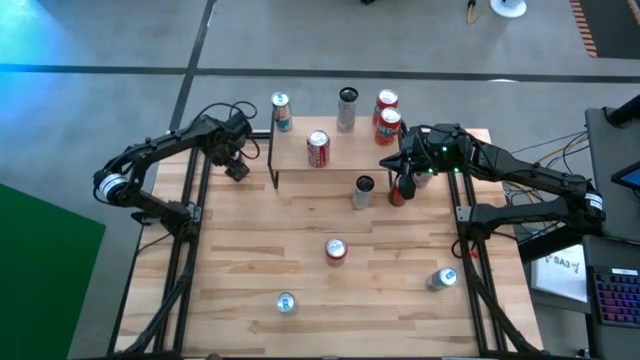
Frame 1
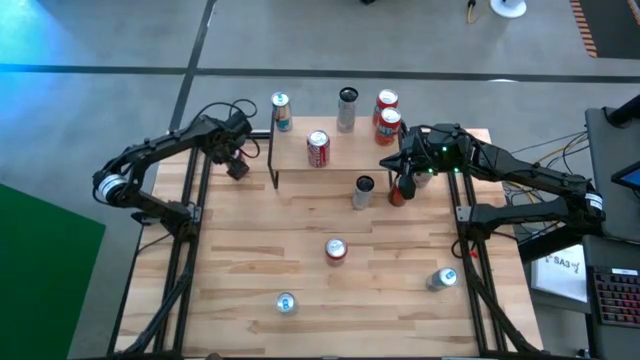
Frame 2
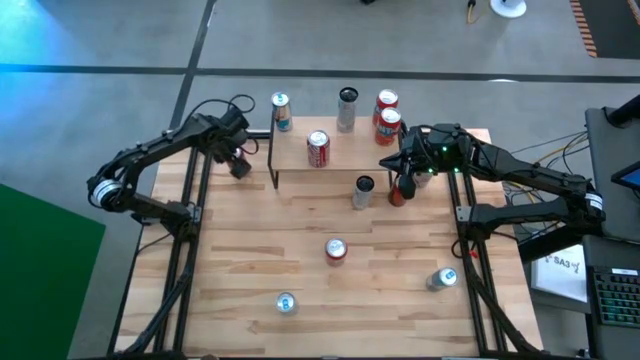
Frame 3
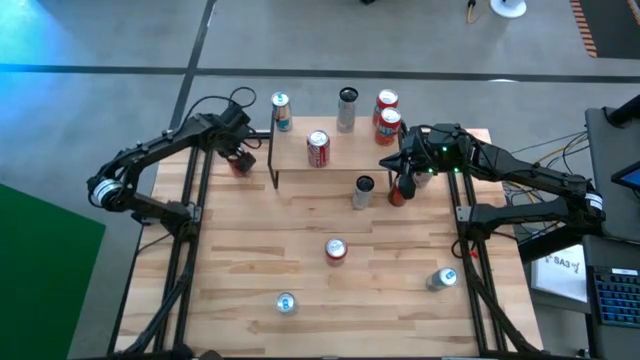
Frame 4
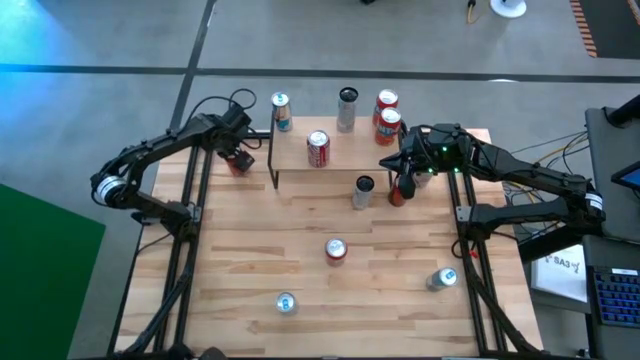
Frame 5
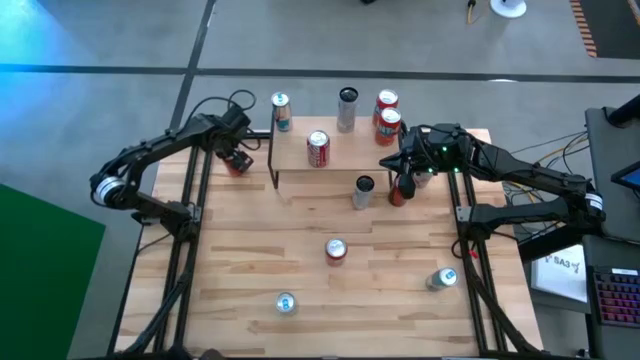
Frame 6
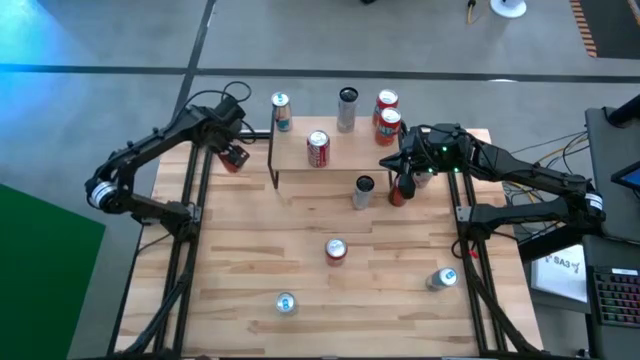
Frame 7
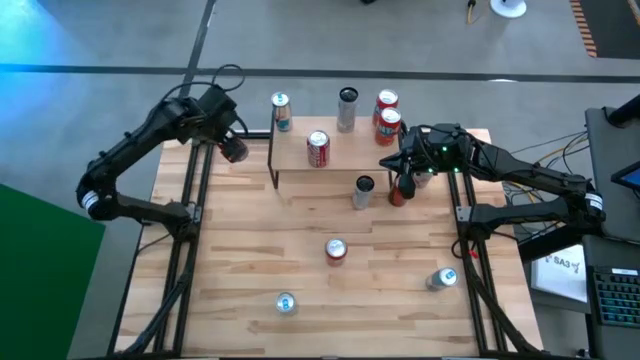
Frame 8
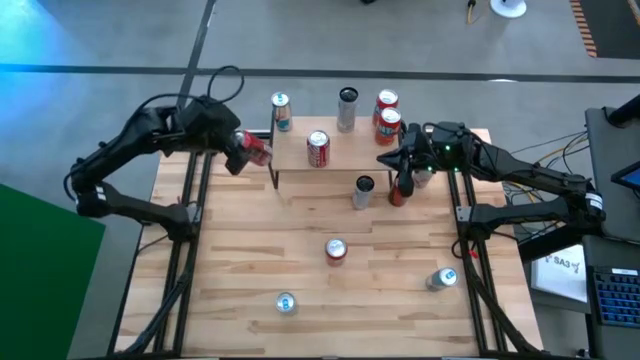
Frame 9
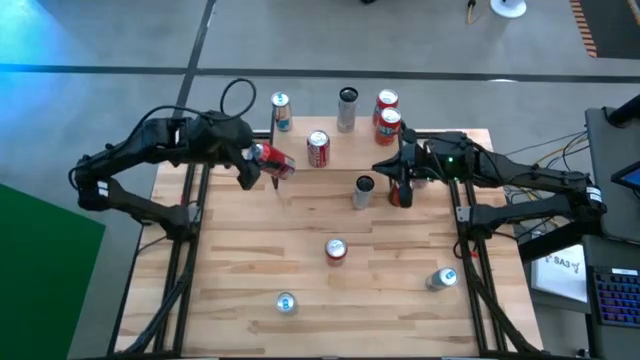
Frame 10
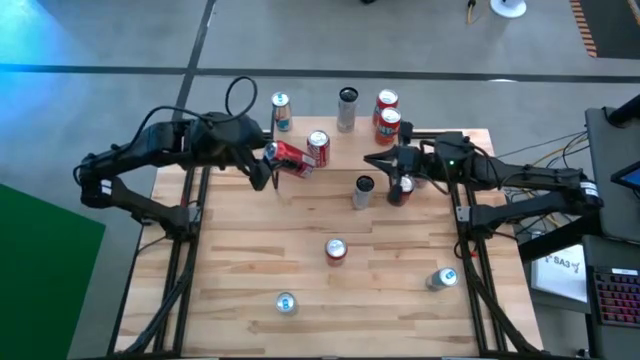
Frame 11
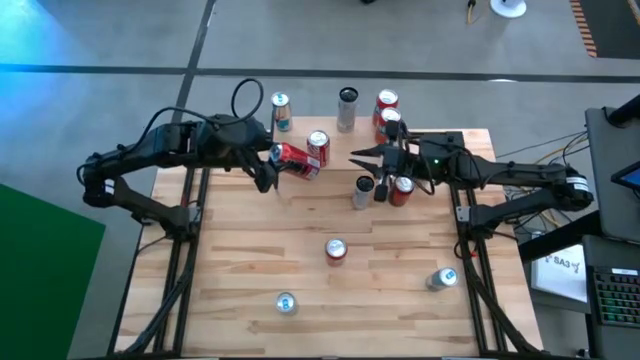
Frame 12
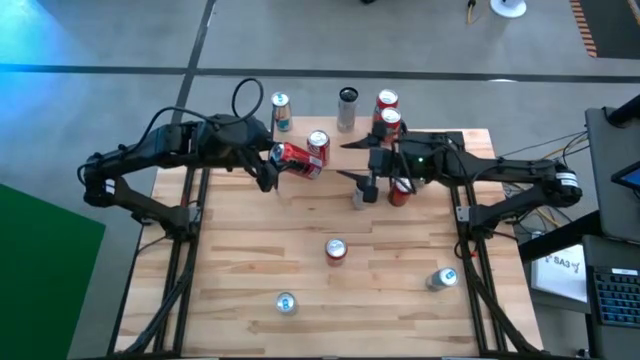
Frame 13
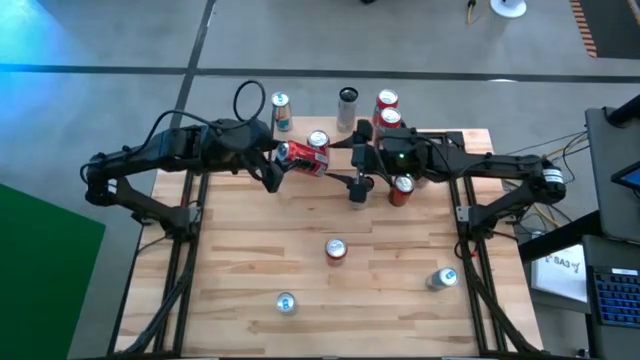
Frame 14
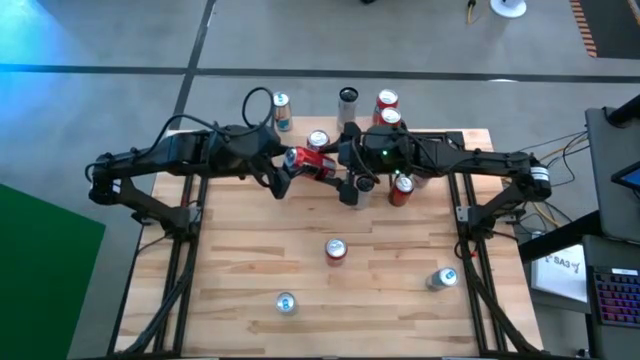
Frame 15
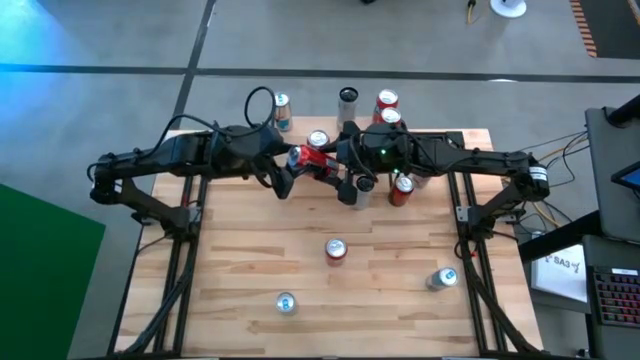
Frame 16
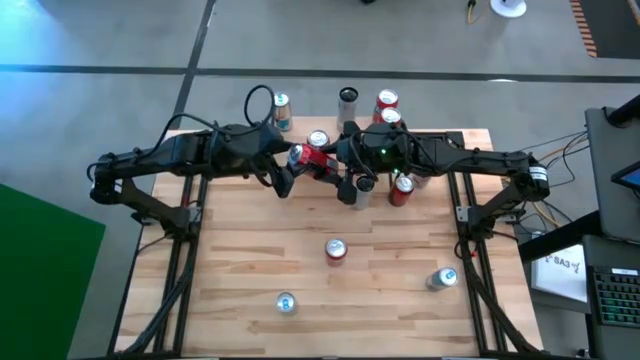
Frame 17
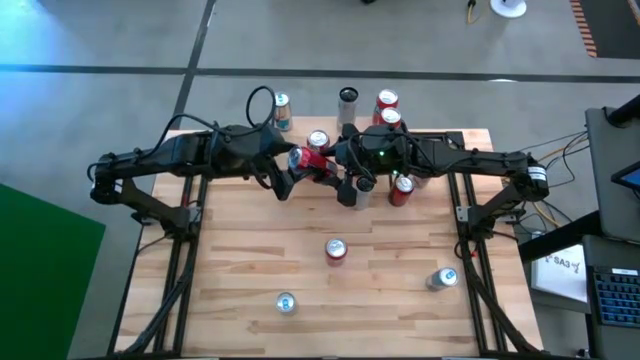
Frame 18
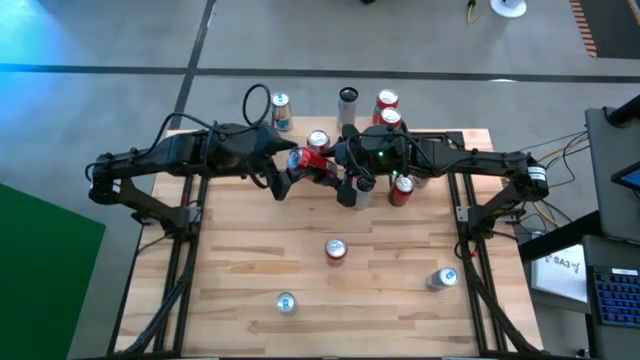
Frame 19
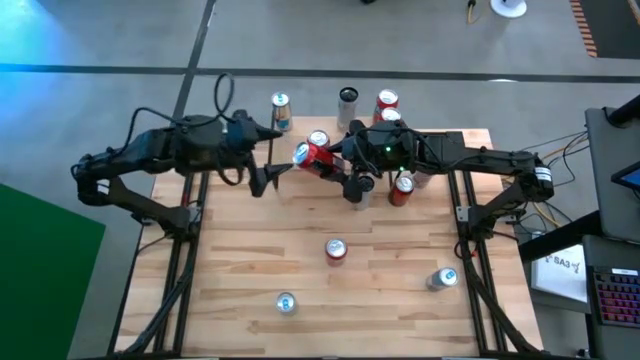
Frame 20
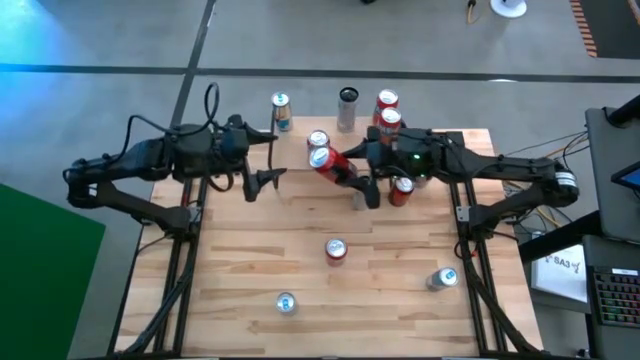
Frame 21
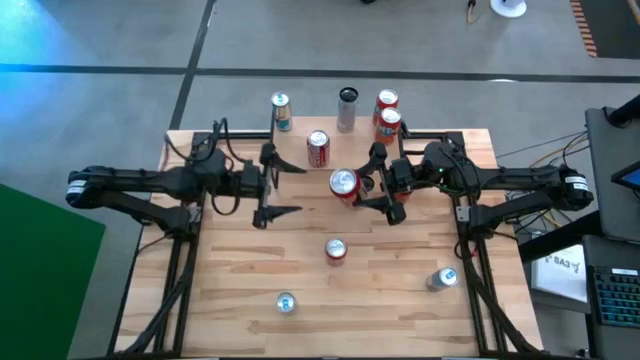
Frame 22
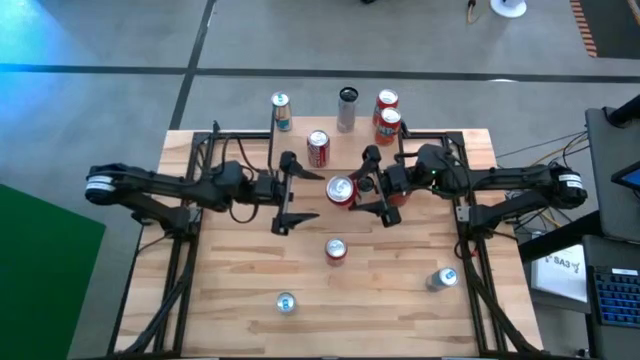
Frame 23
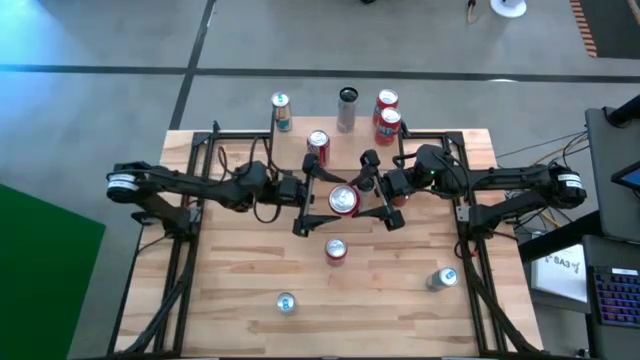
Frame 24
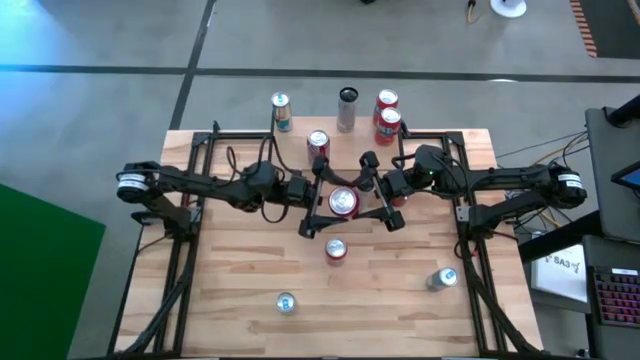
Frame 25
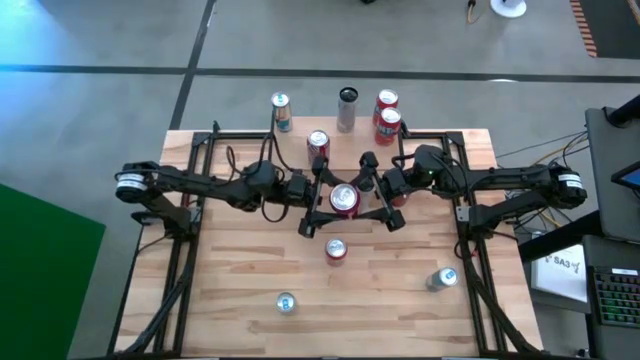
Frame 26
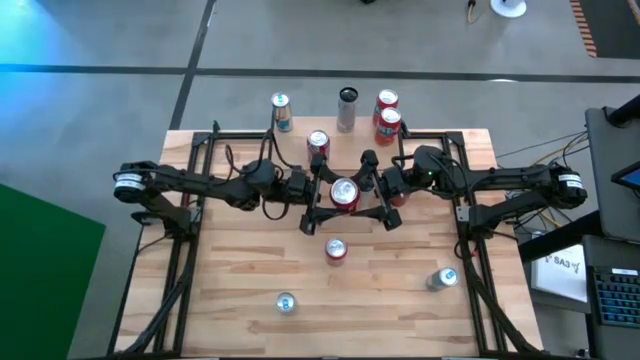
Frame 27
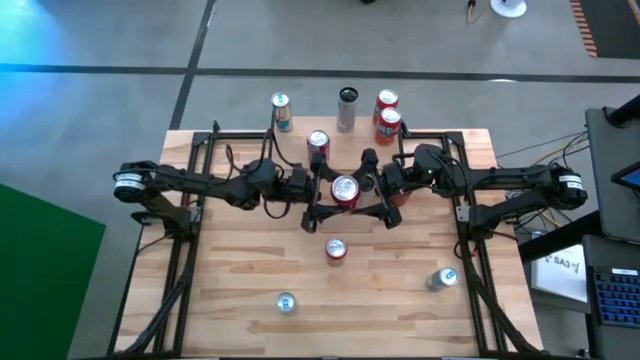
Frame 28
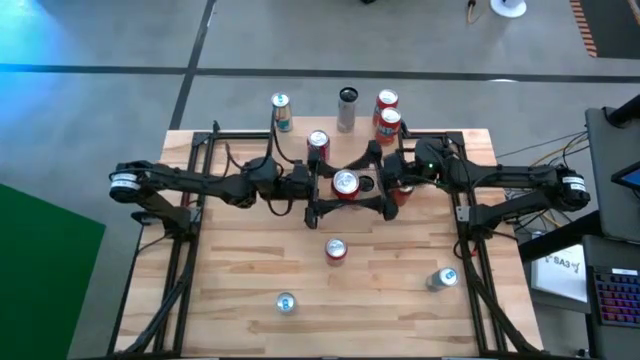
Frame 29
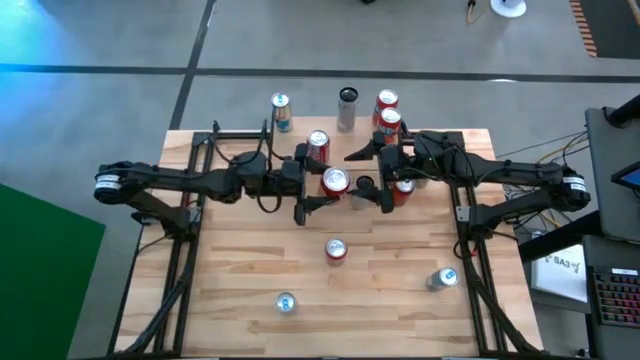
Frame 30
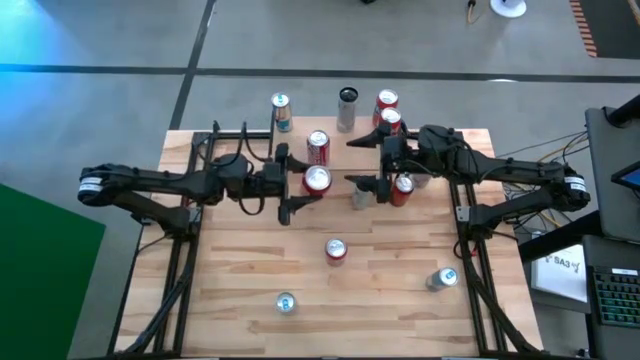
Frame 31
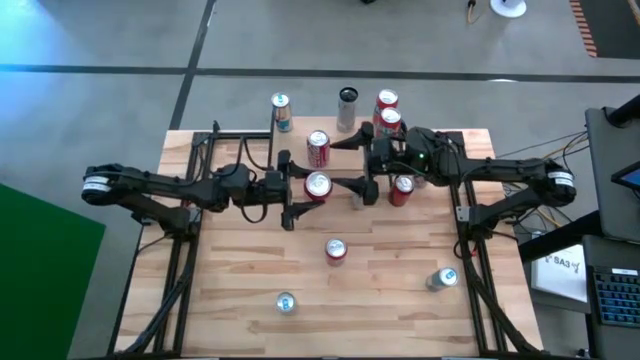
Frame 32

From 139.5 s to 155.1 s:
Task: Place canned beverage on shelf
Put the top red black soda can on the shelf

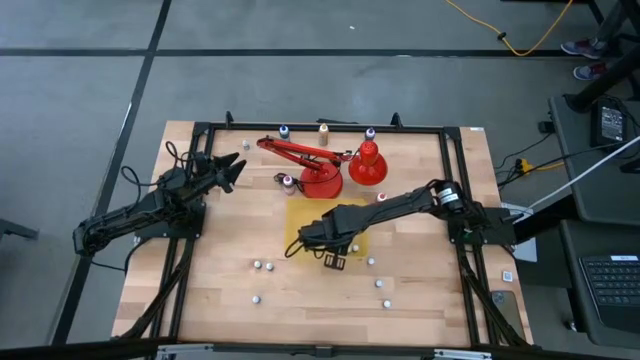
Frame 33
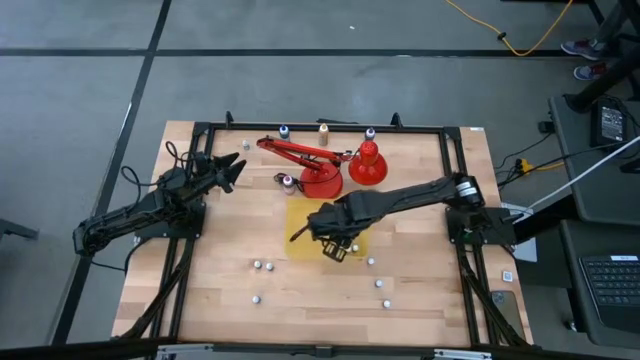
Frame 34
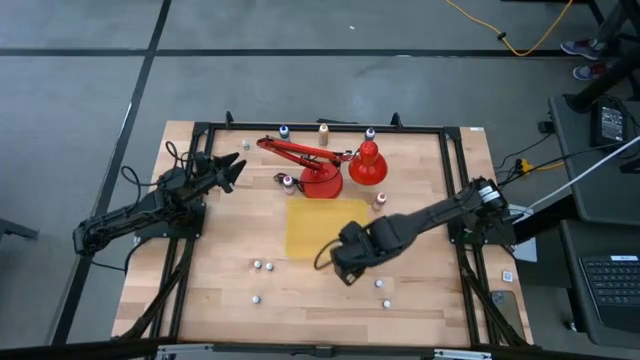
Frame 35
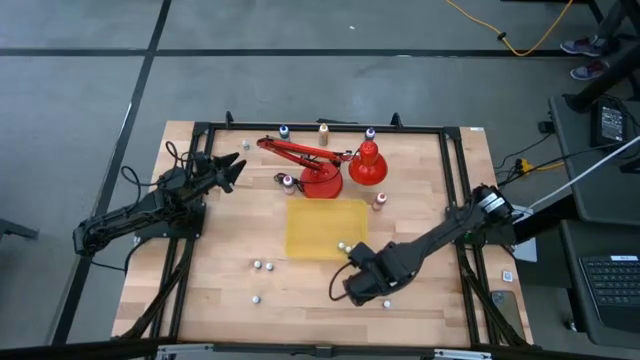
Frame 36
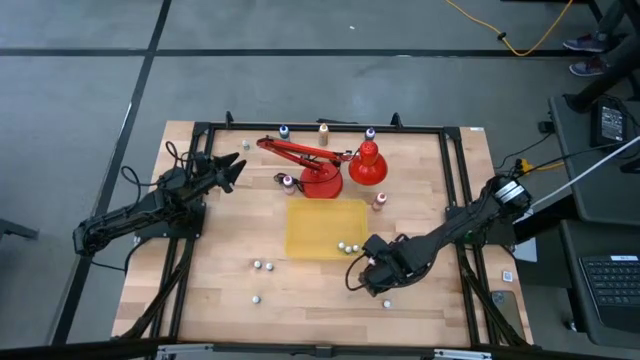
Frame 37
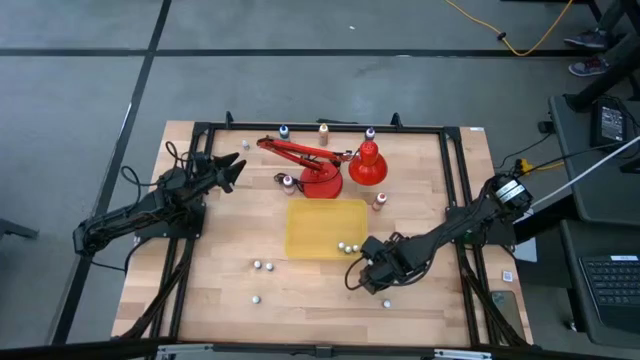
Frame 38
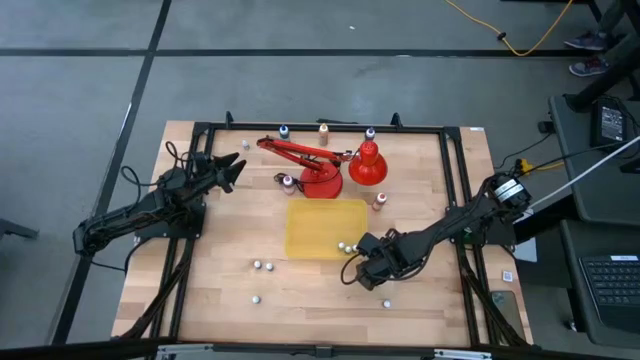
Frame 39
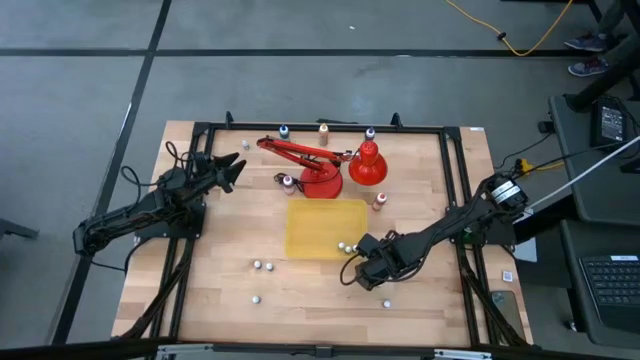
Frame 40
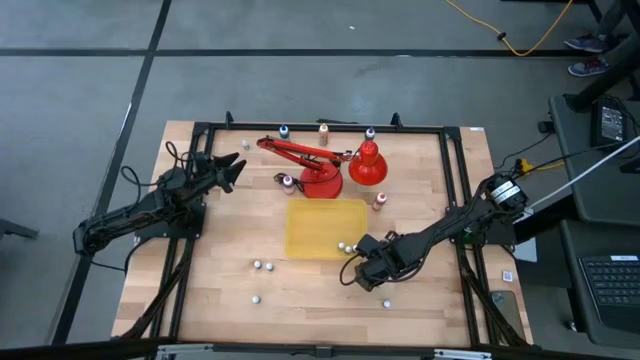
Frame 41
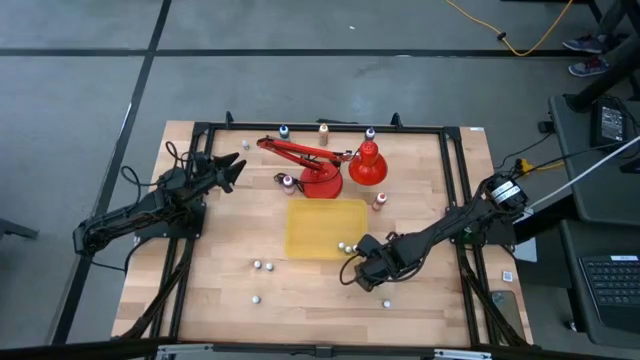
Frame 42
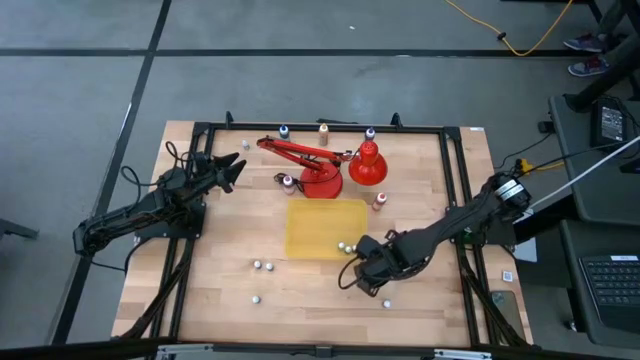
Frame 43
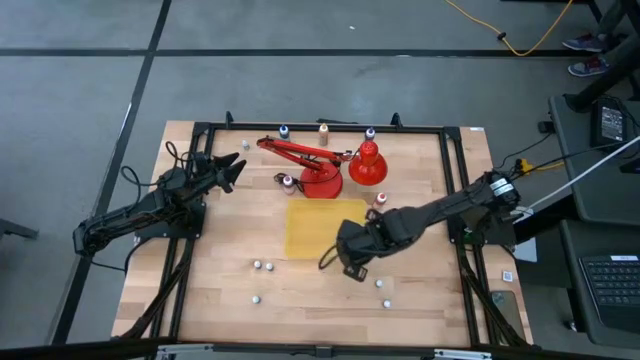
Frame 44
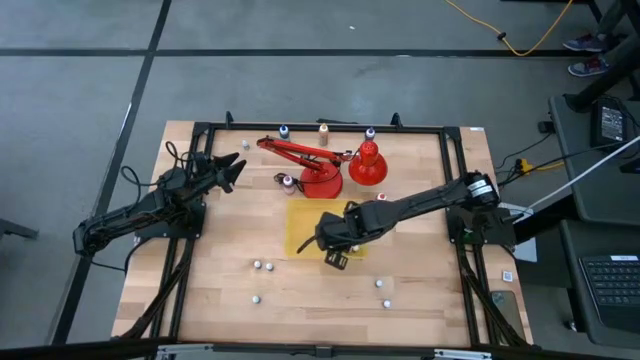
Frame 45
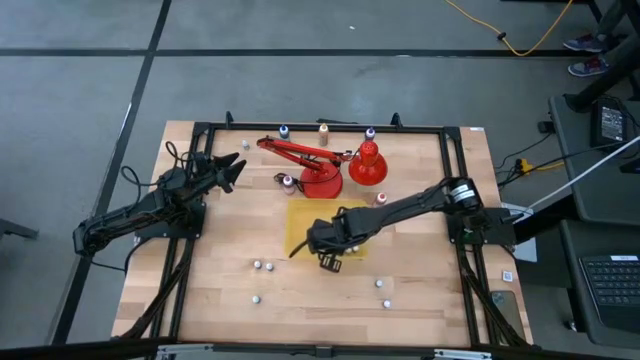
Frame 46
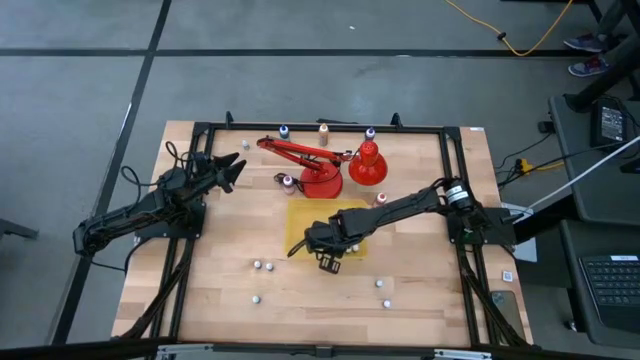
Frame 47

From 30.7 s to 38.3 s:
Task: Pick & Place food coloring
Put the small green food bottle into the yellow bin
